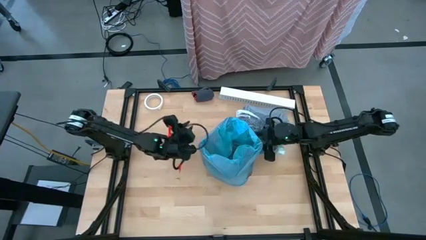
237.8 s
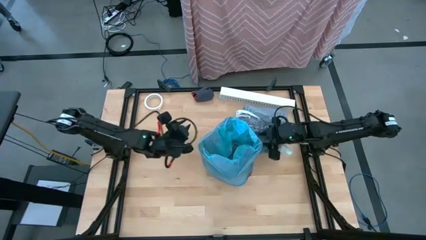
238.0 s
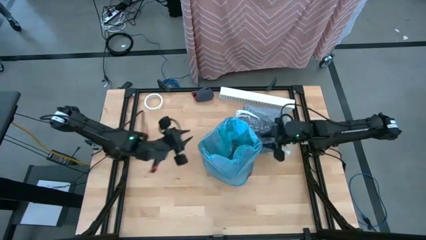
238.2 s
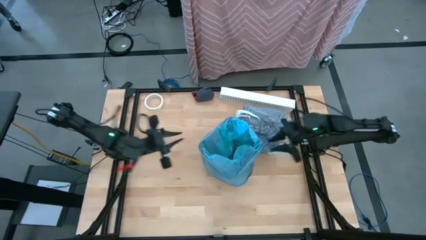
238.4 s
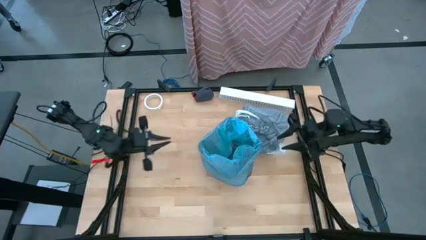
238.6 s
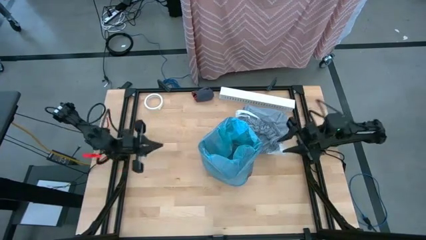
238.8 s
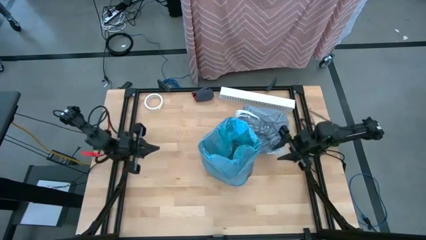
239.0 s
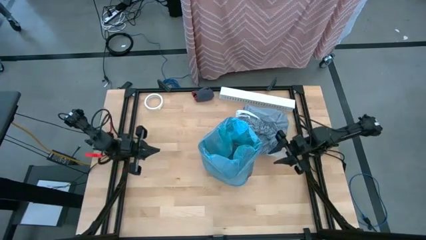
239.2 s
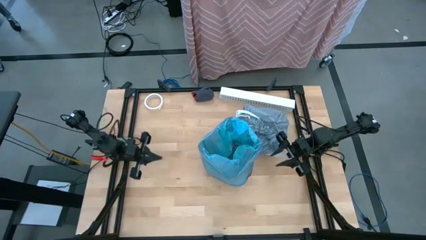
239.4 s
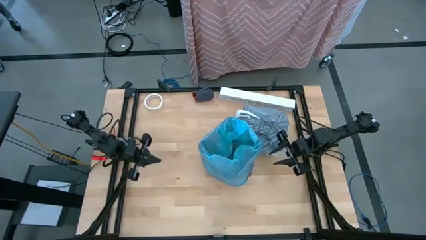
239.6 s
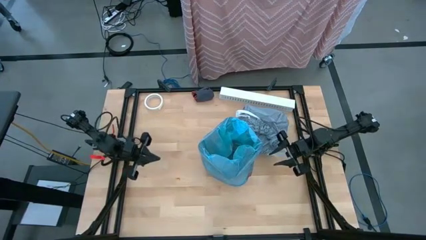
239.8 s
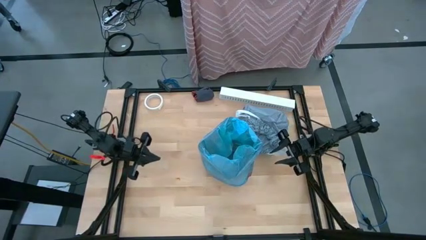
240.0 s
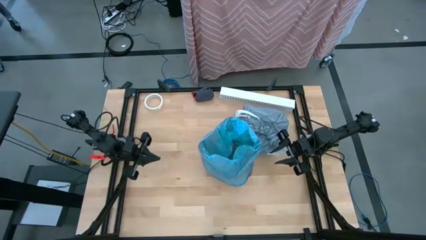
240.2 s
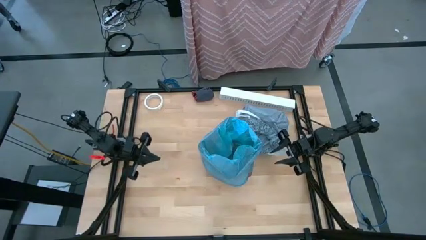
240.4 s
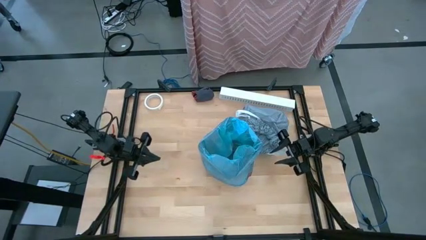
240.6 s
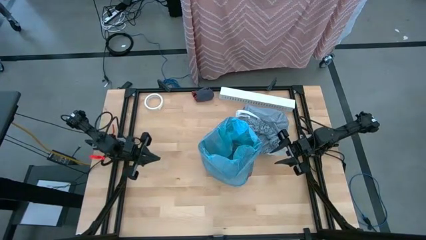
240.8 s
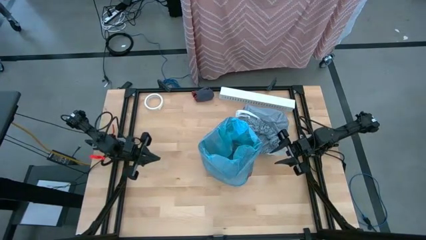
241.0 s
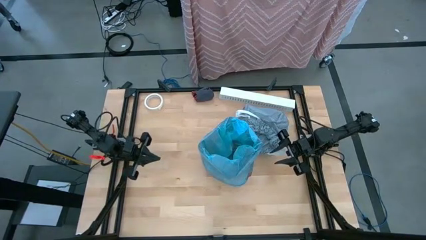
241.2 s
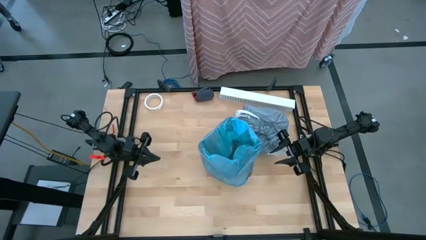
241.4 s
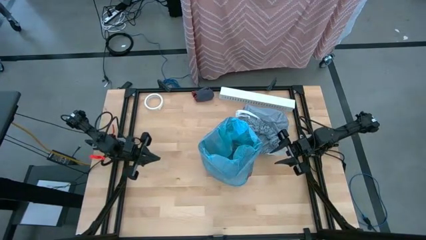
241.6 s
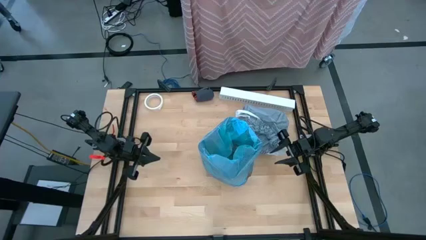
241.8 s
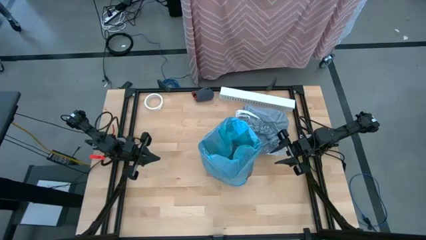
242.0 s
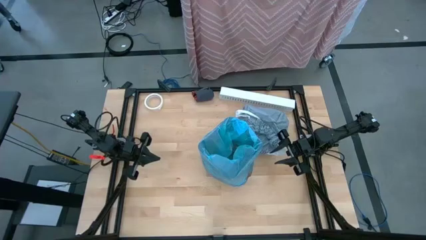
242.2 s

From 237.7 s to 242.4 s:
Task: place trash/remove bag and relplace
Return to Home Position

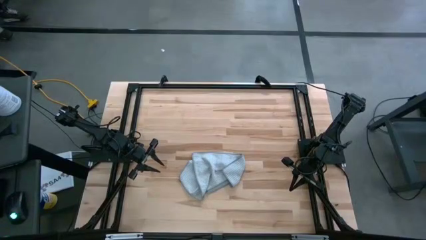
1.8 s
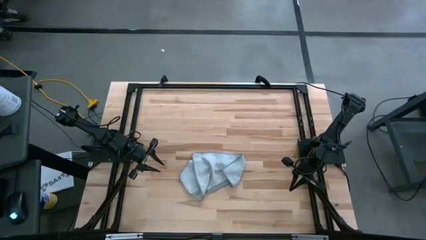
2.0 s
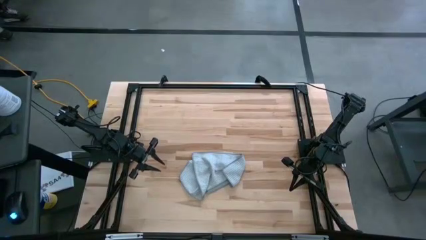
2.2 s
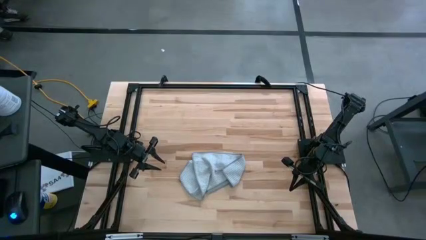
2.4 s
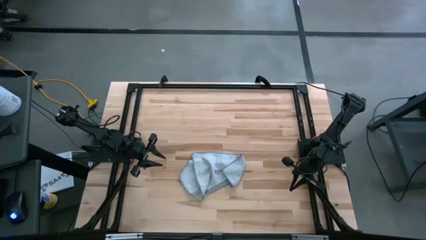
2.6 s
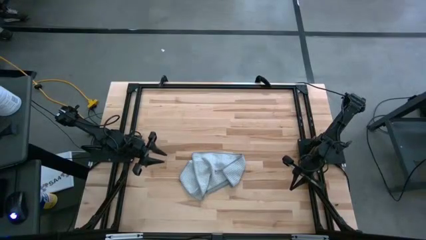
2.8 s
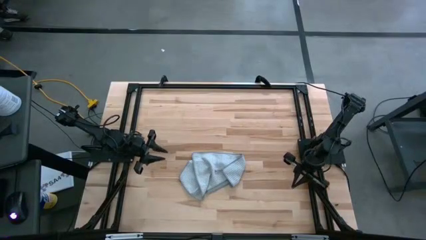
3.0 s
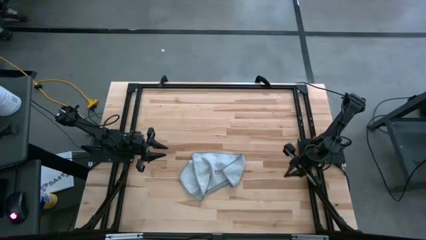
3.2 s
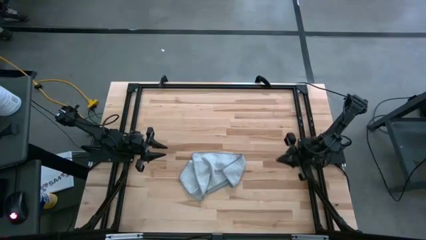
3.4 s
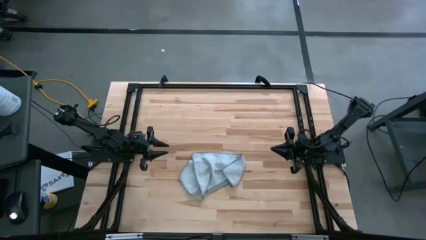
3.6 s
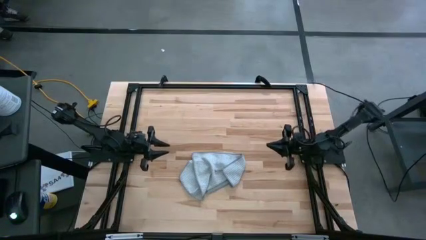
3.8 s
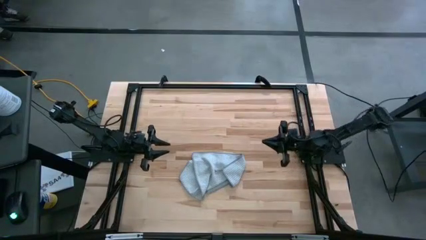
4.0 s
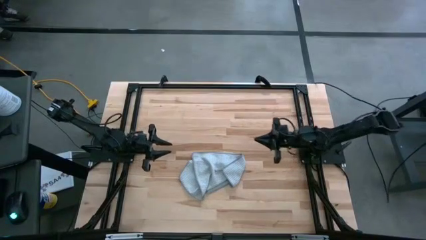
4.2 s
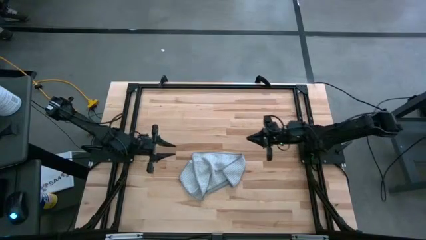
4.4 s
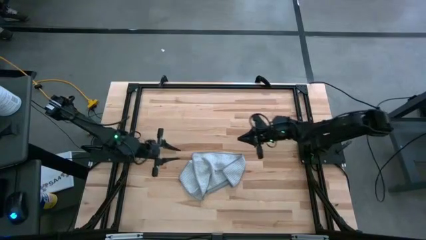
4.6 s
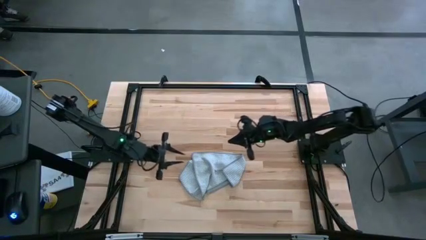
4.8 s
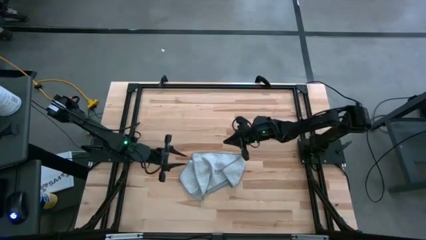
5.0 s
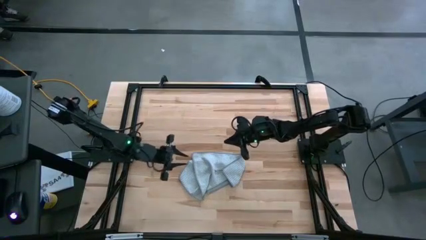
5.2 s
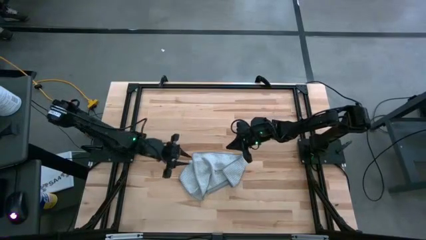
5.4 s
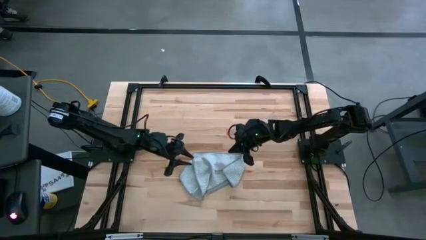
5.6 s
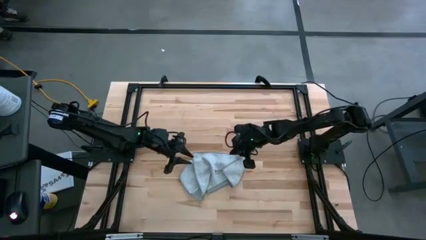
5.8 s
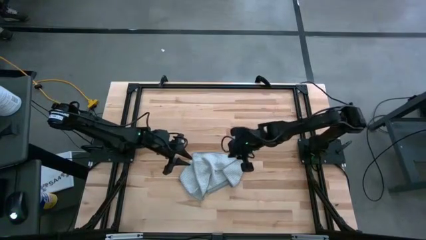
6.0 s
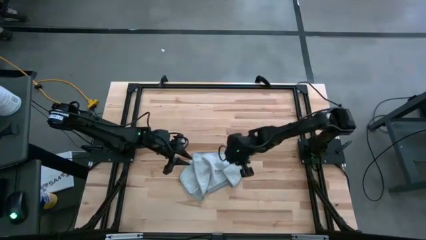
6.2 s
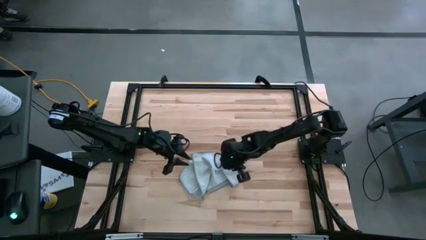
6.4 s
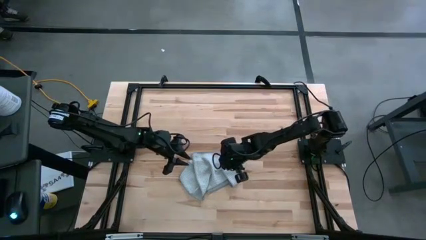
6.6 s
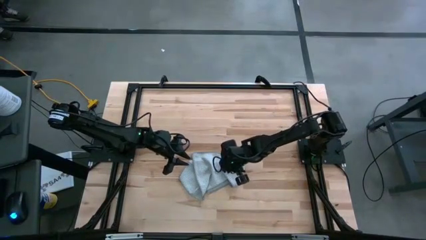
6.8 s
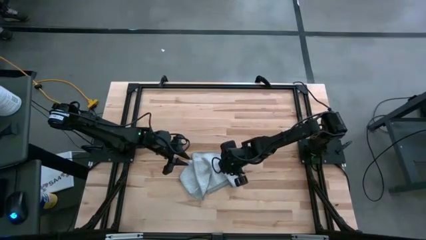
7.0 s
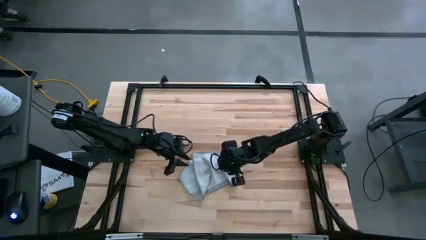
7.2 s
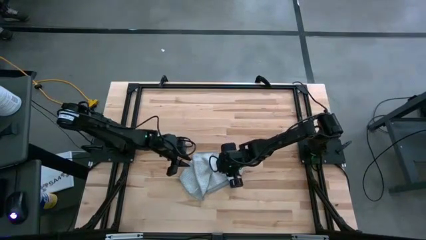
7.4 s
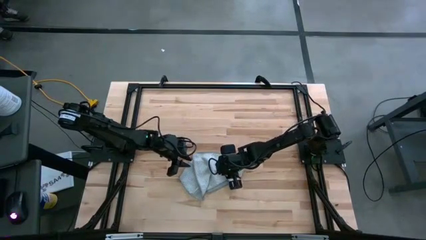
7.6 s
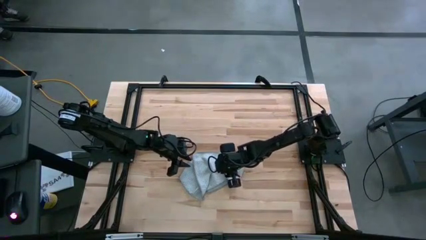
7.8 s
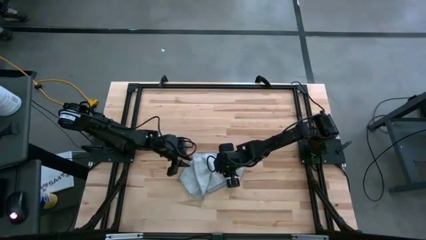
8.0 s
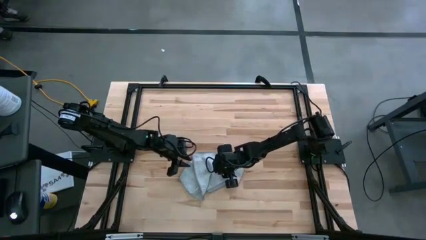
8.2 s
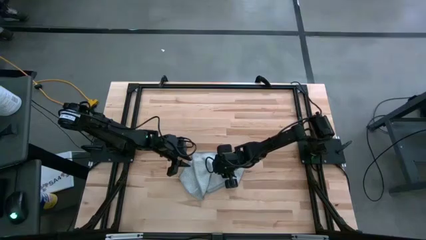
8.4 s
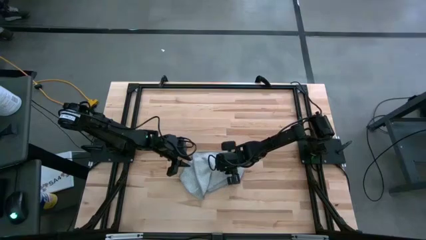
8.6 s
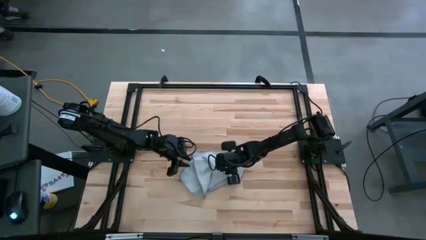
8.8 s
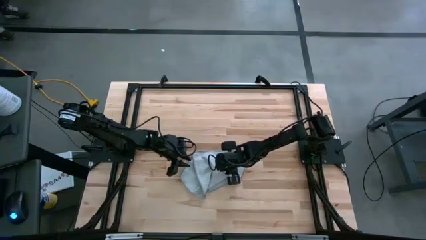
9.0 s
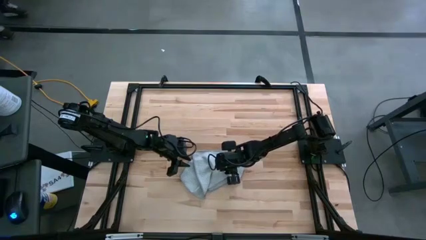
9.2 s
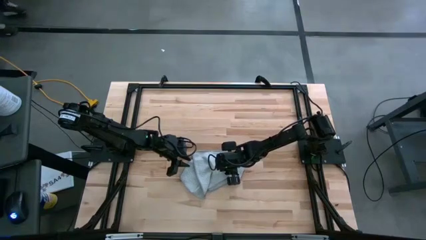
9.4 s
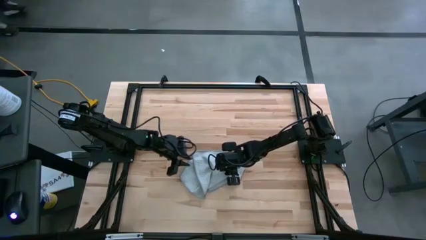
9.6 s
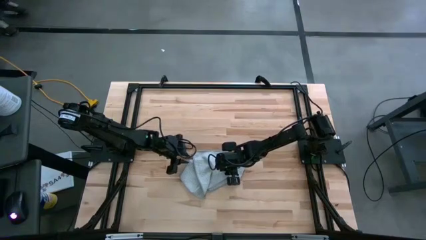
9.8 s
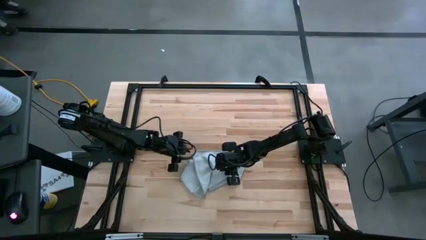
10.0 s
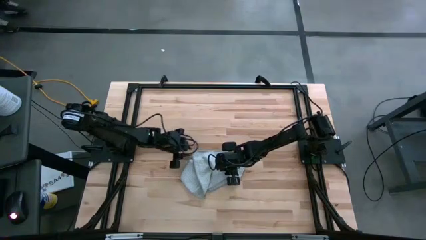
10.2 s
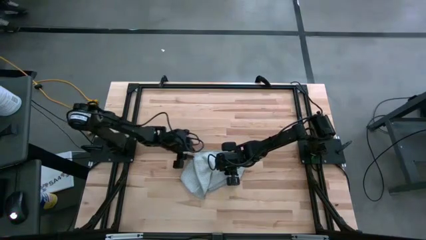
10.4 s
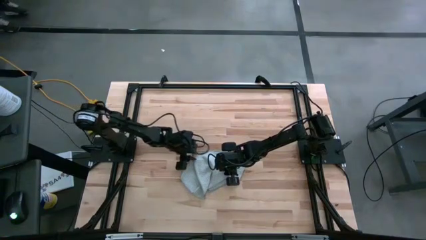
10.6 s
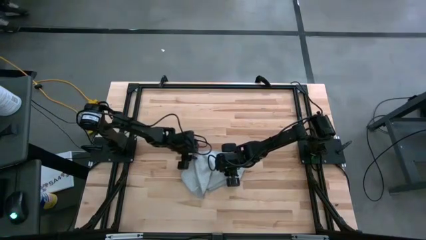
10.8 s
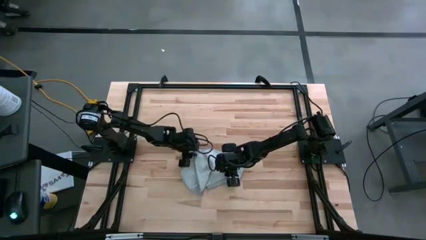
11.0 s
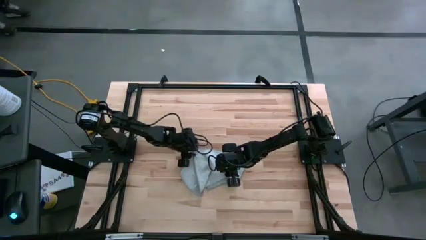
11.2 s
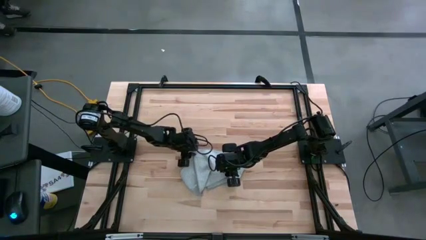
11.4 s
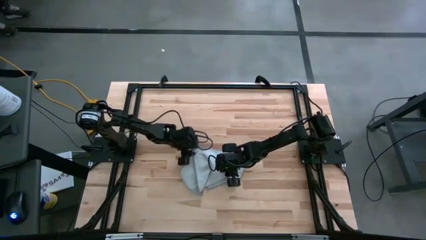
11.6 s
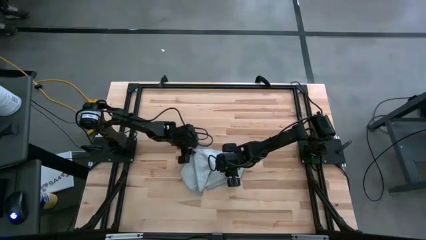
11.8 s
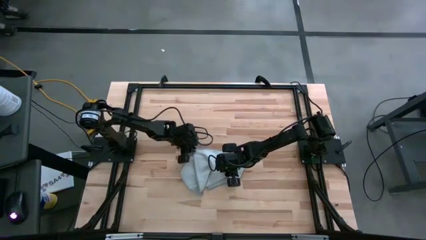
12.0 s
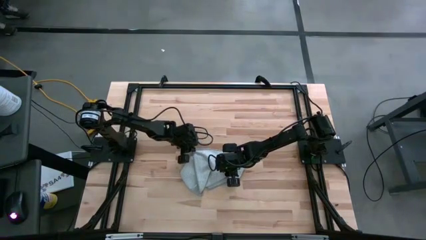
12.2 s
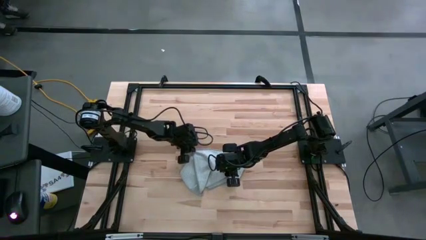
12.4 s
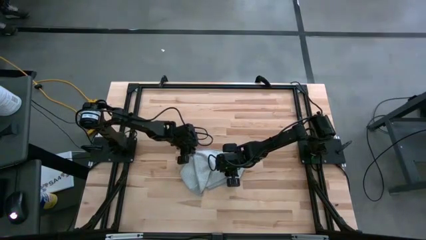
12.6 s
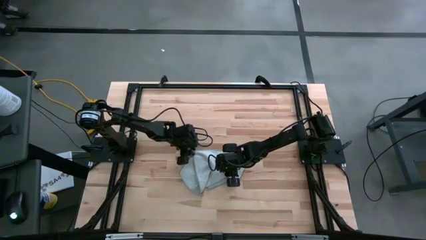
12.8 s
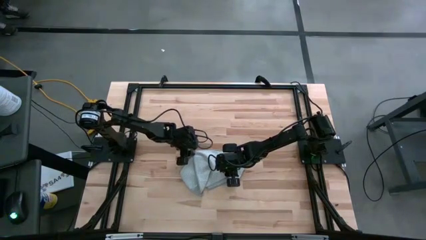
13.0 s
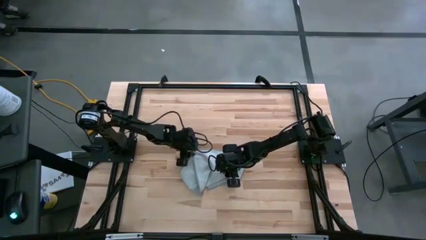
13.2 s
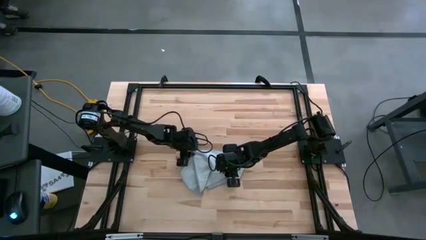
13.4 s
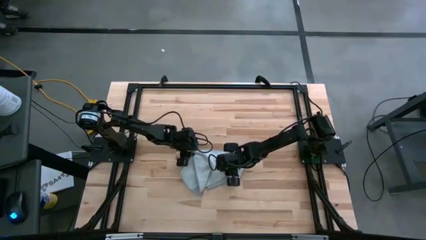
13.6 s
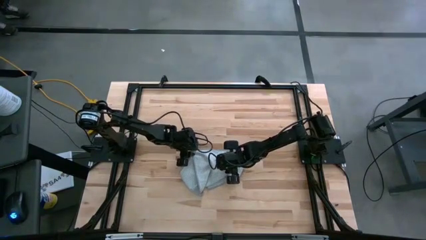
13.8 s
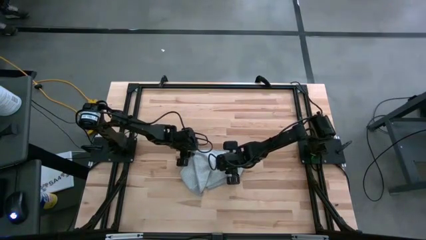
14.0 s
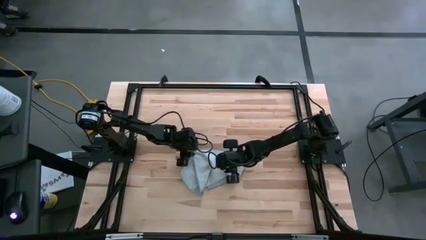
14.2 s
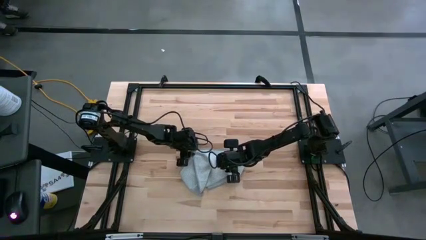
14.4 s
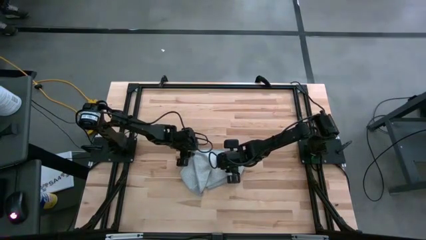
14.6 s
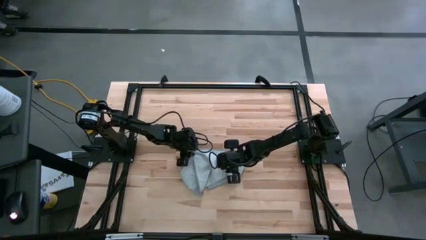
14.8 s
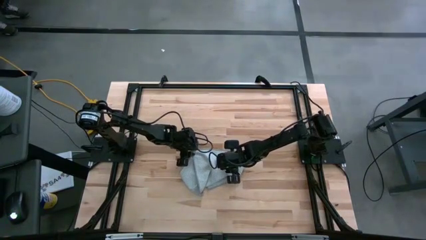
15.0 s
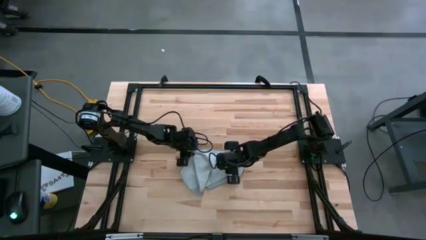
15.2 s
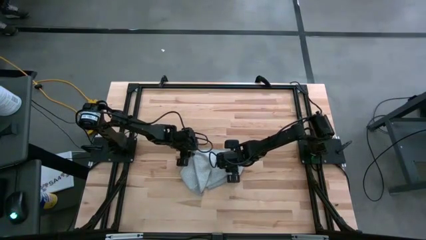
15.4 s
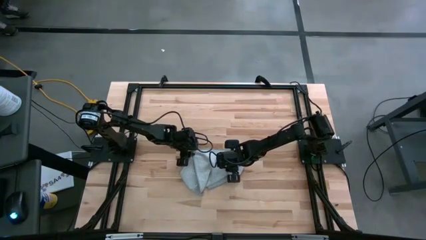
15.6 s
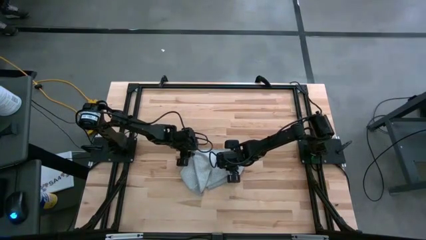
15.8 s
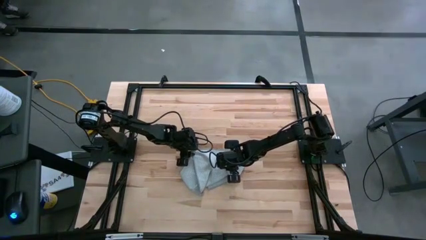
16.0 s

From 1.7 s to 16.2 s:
Task: Fold microfiber towels
Fold the gray microfiber towel
